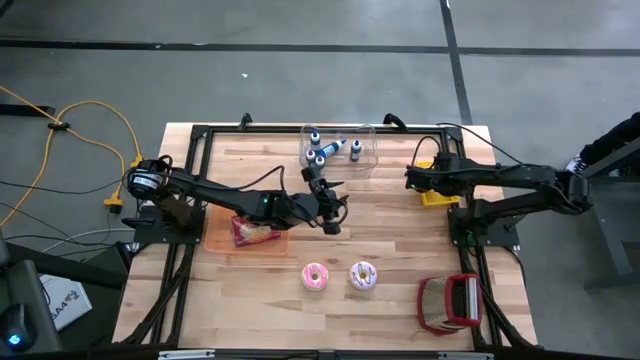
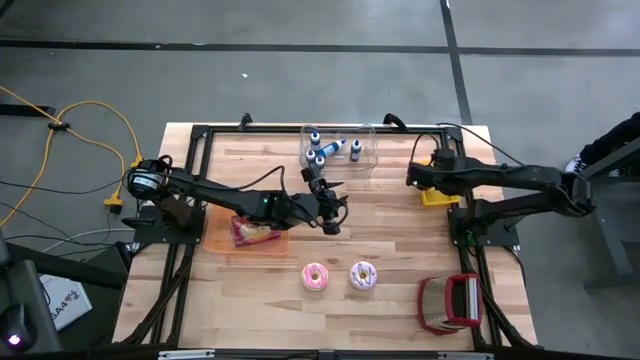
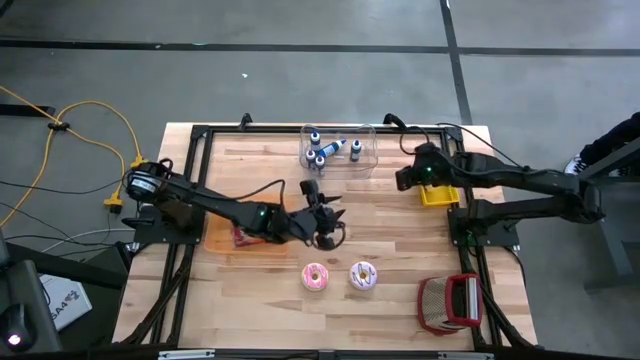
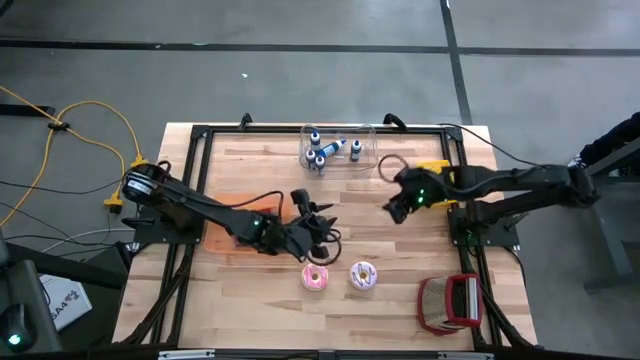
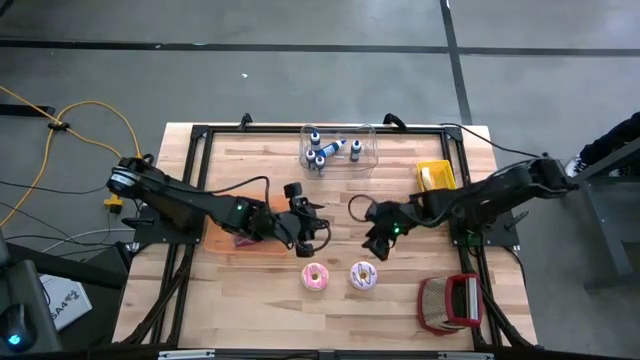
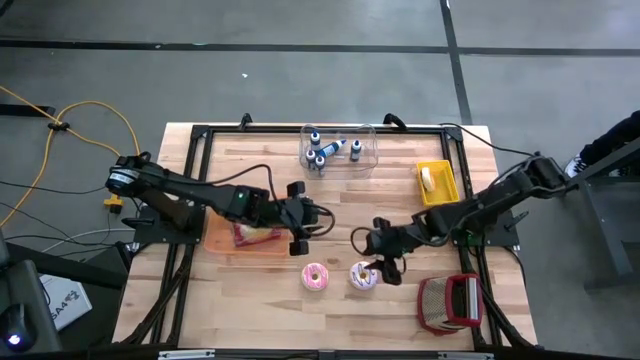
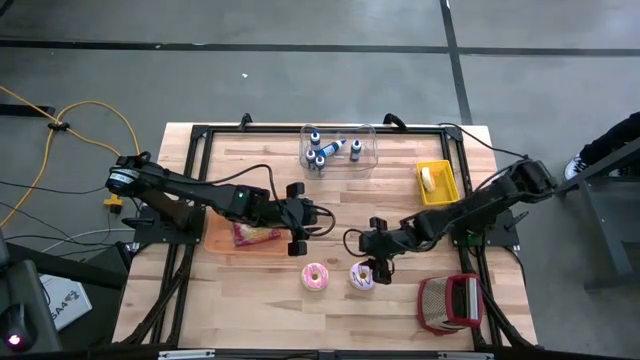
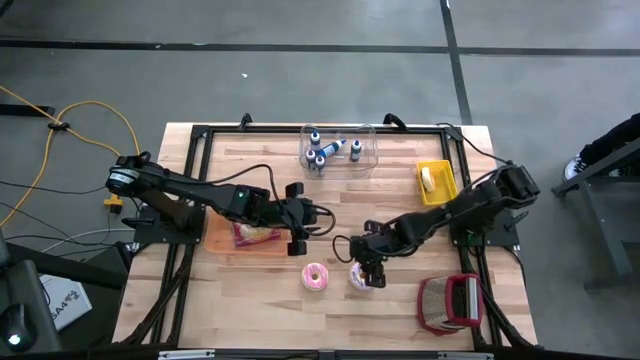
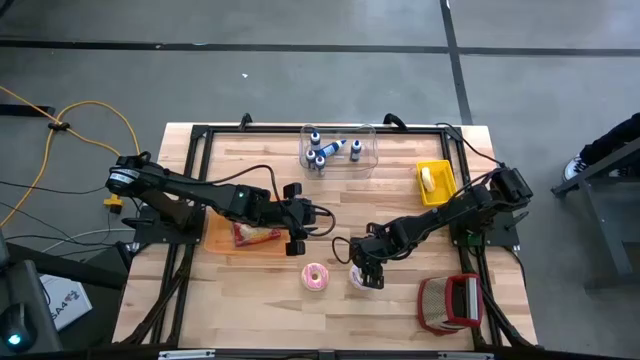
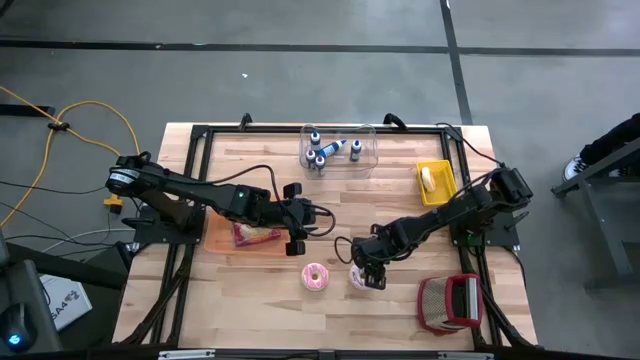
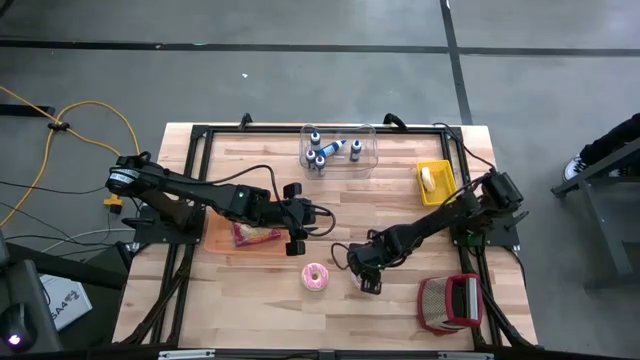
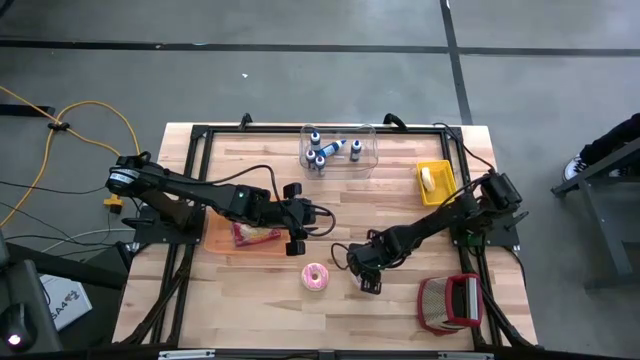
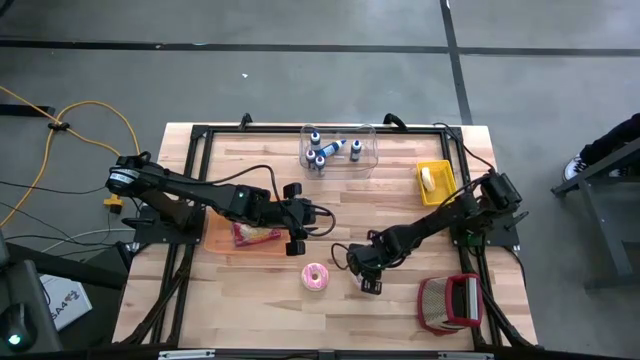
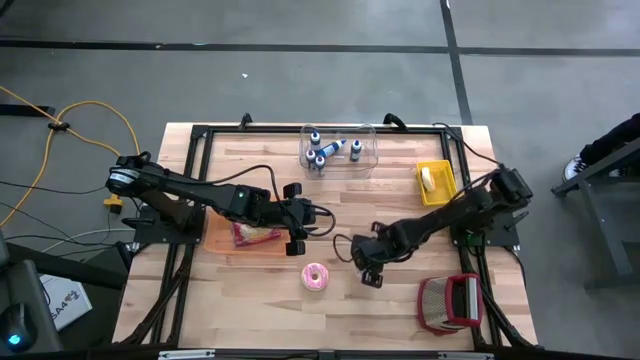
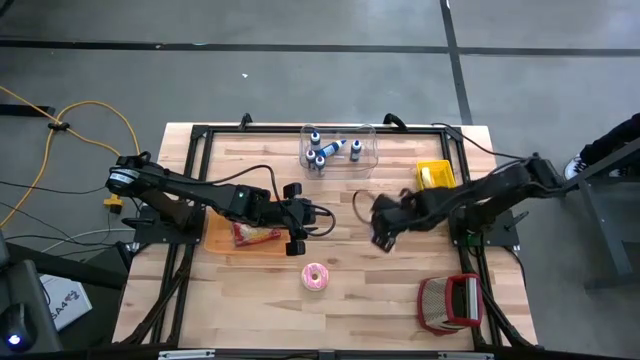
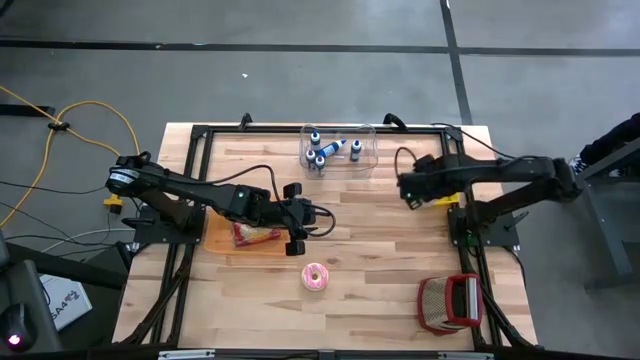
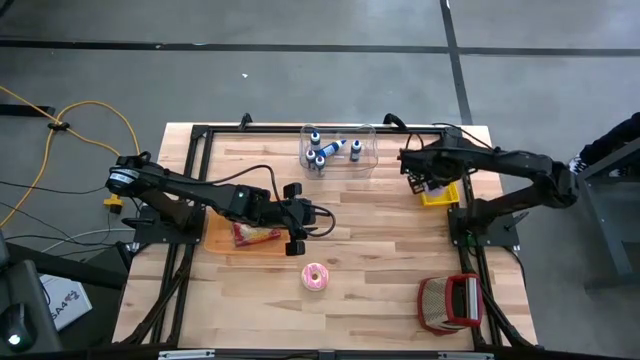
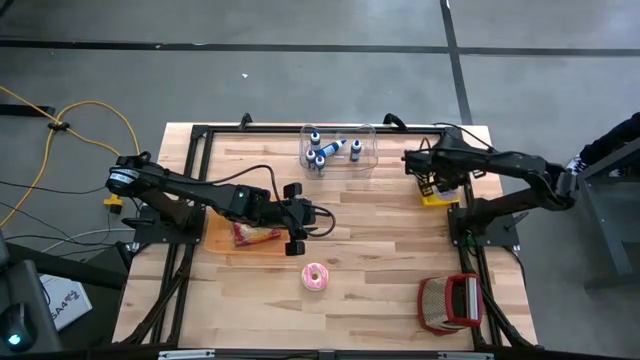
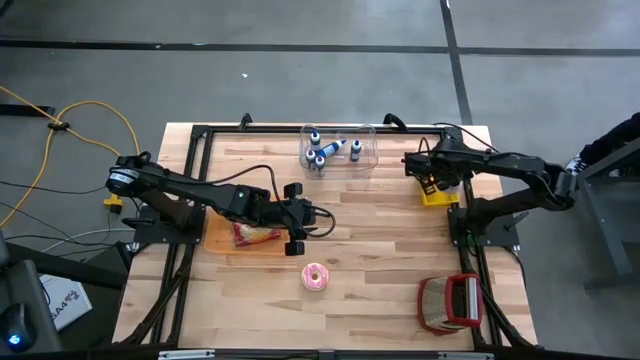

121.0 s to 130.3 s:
Put the purple donut into the yellow bin

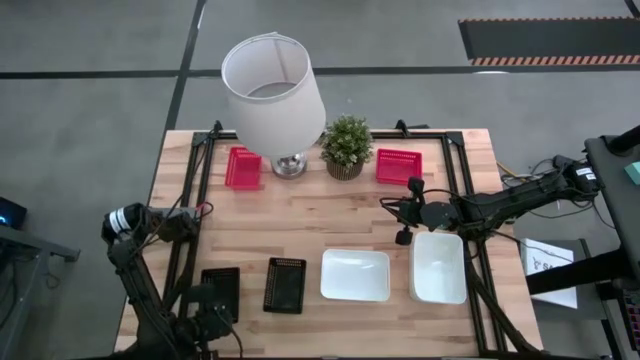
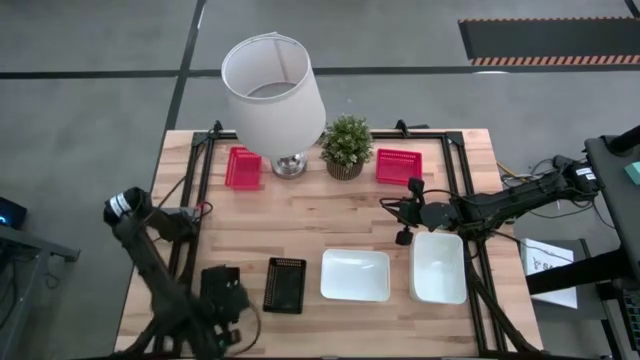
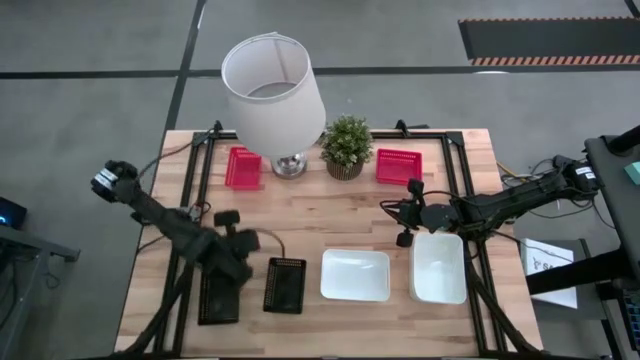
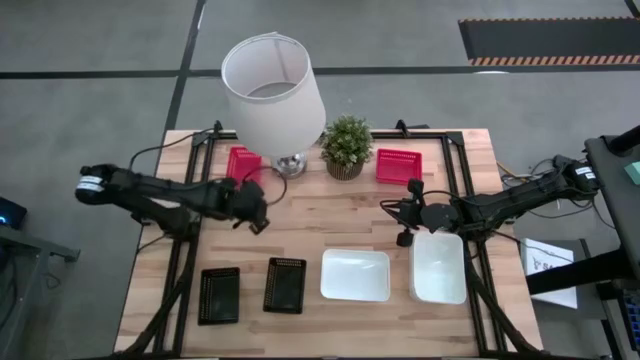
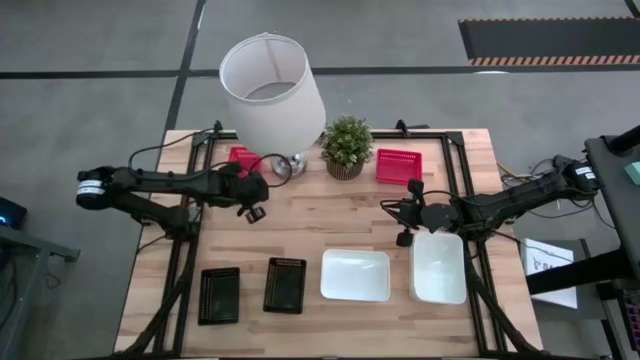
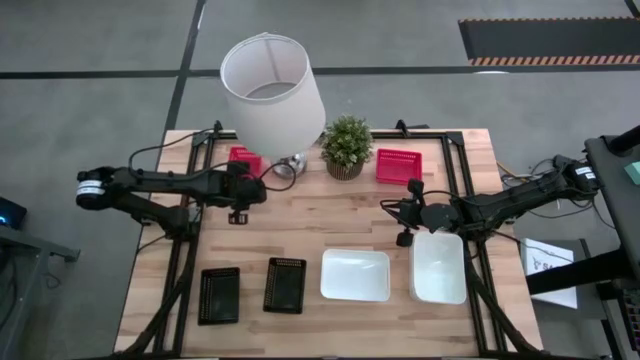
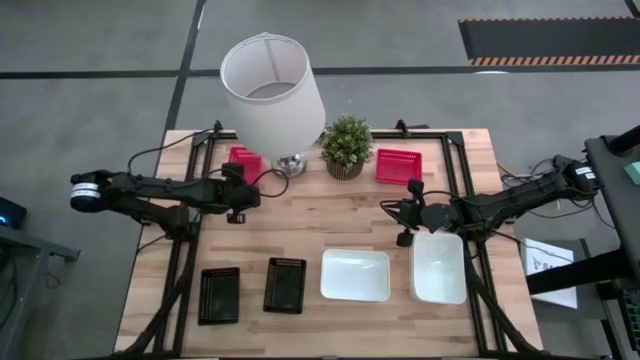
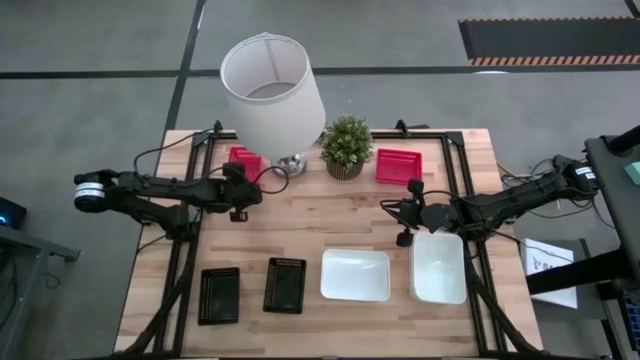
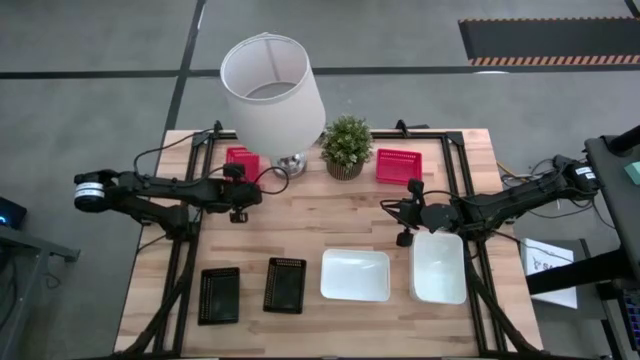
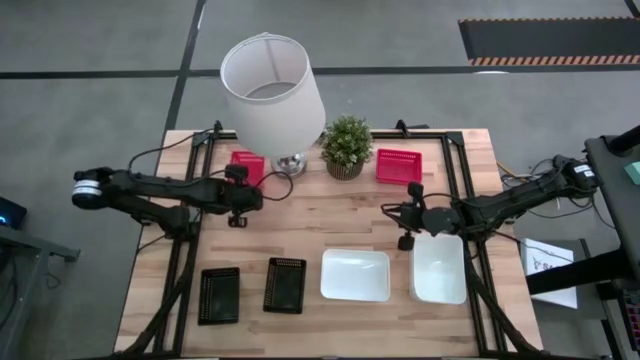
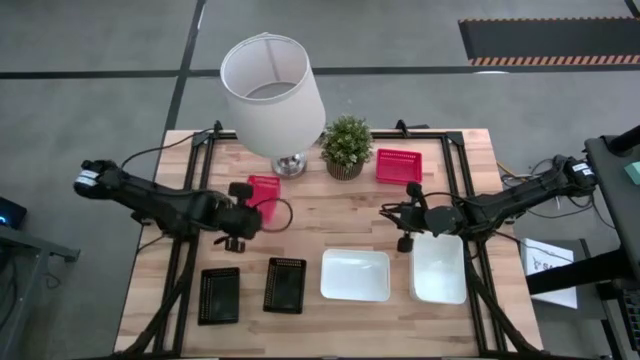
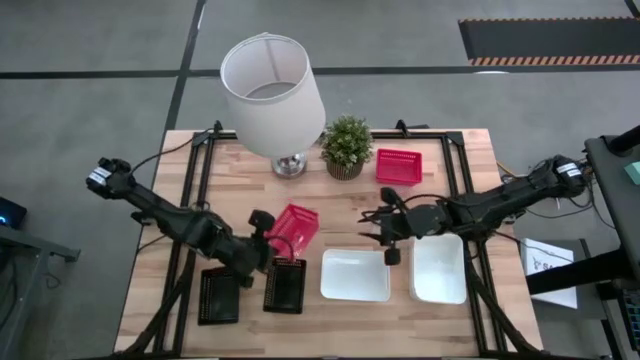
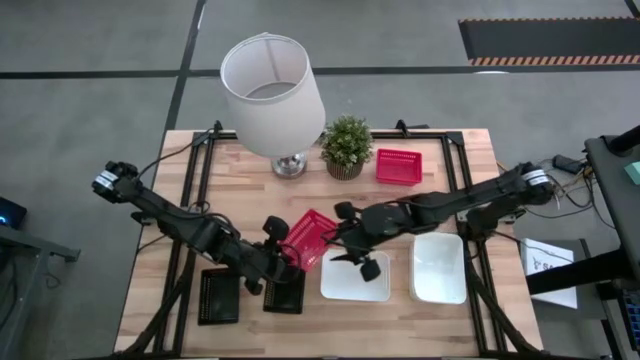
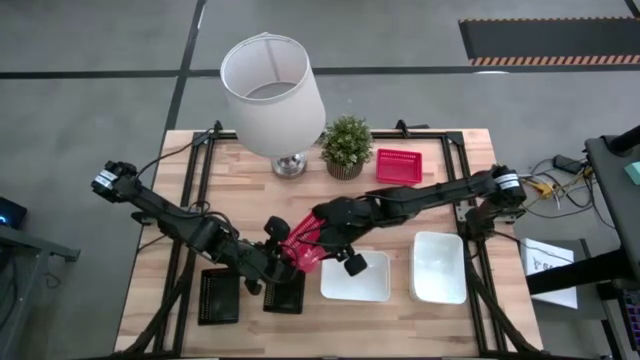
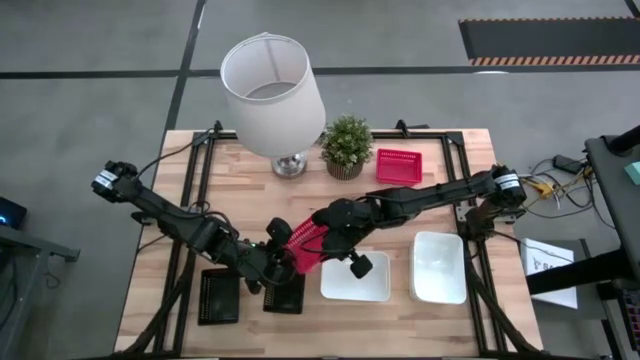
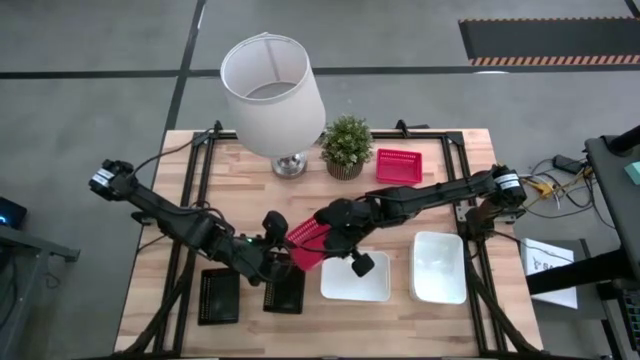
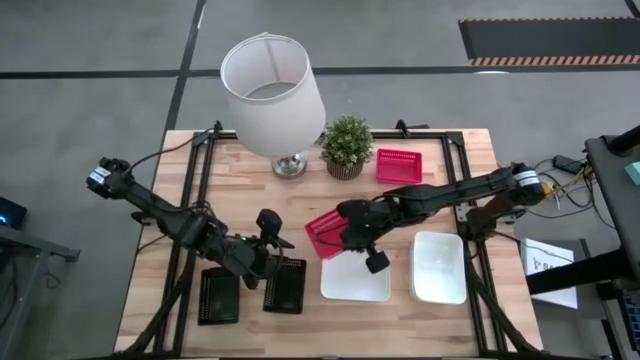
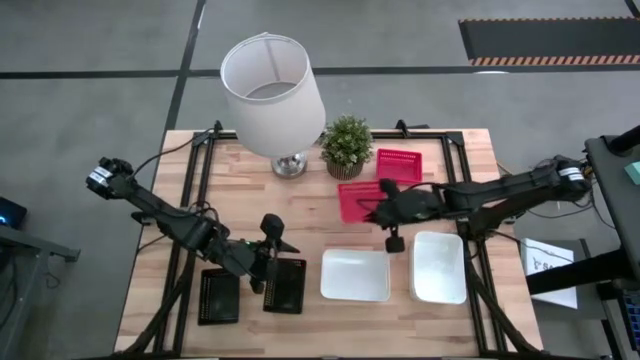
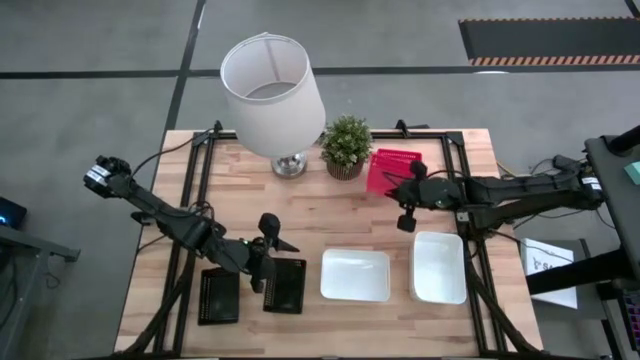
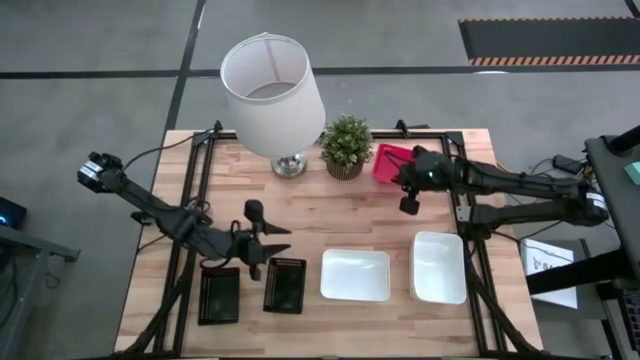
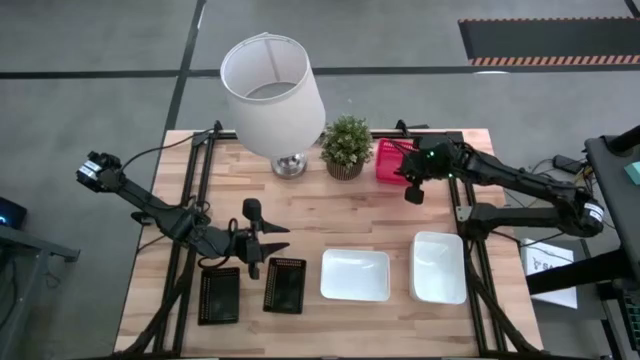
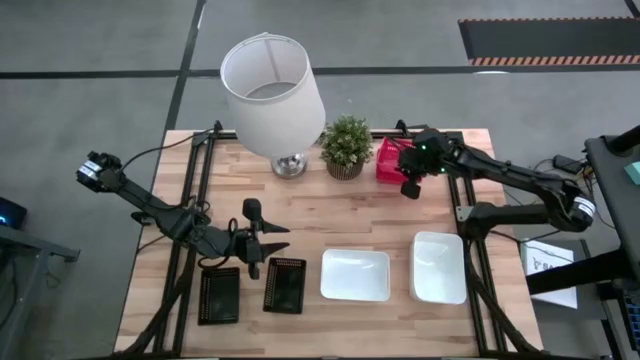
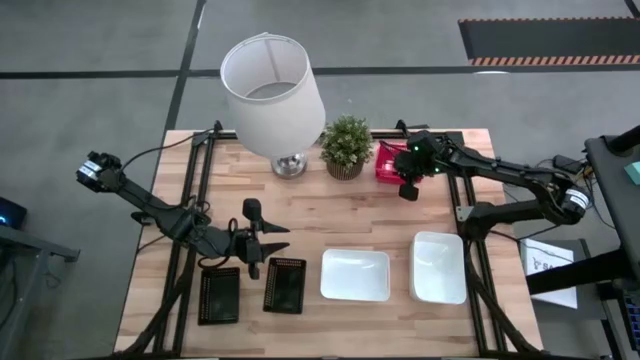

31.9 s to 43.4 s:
Stack the left red bin on the red bins
